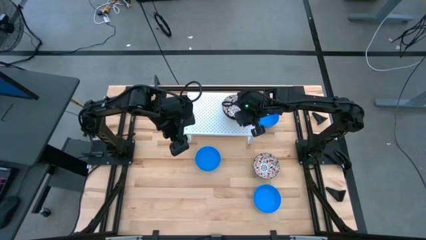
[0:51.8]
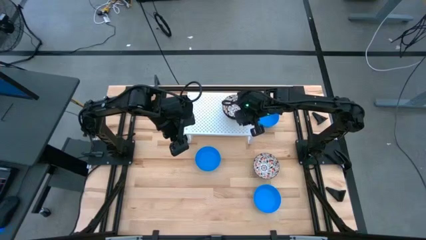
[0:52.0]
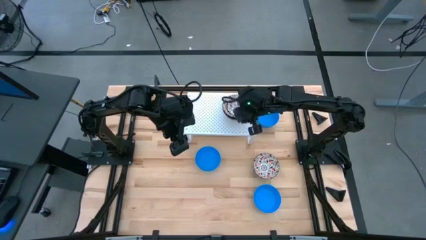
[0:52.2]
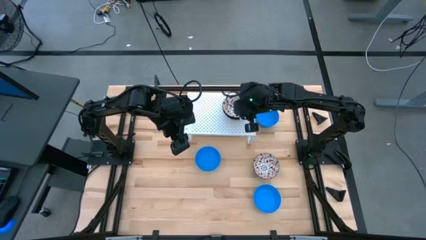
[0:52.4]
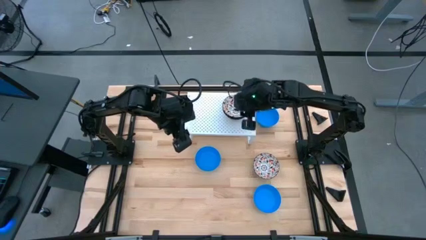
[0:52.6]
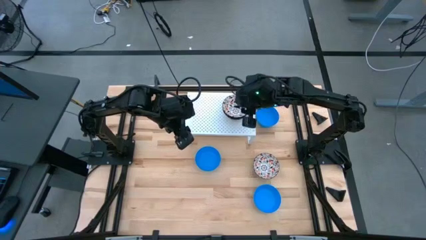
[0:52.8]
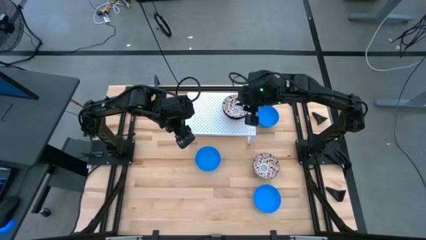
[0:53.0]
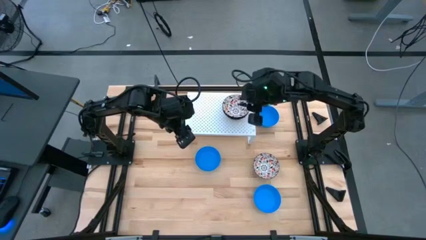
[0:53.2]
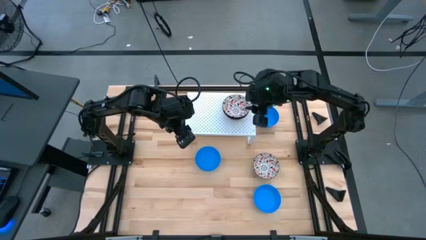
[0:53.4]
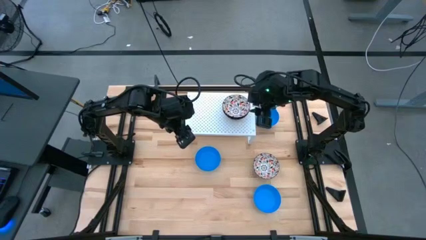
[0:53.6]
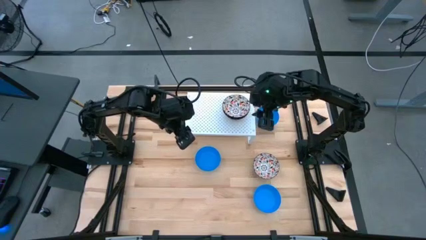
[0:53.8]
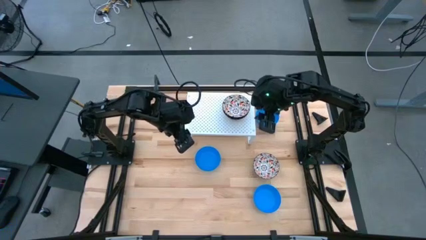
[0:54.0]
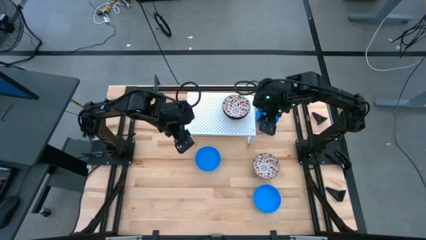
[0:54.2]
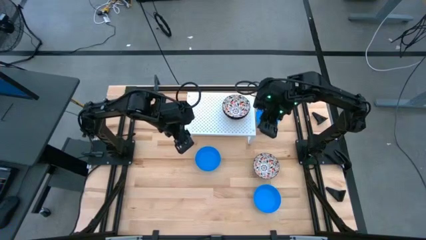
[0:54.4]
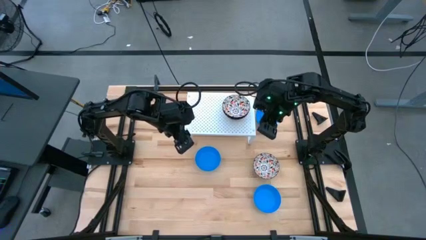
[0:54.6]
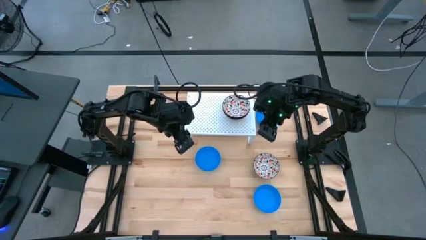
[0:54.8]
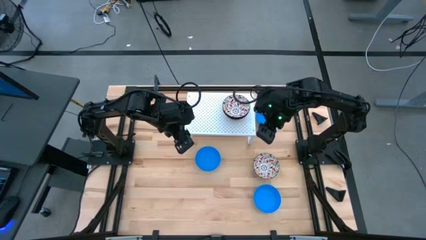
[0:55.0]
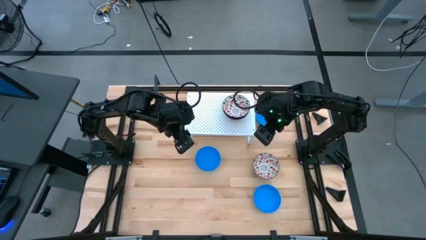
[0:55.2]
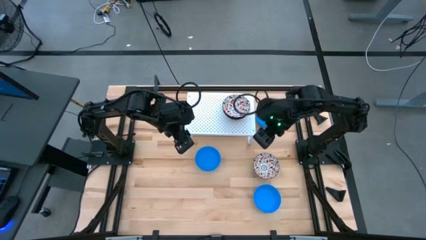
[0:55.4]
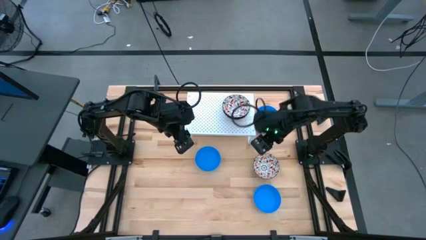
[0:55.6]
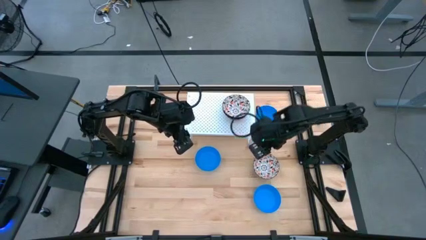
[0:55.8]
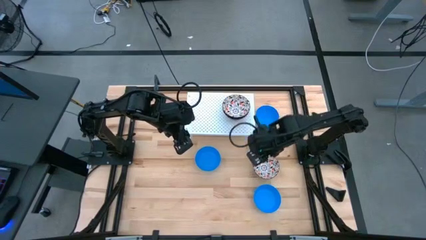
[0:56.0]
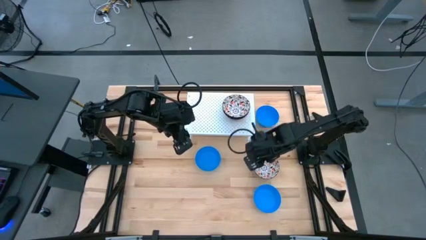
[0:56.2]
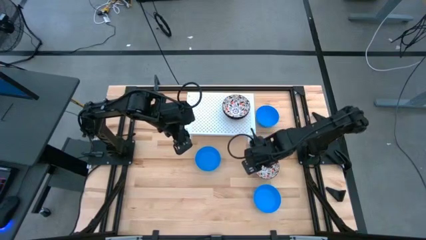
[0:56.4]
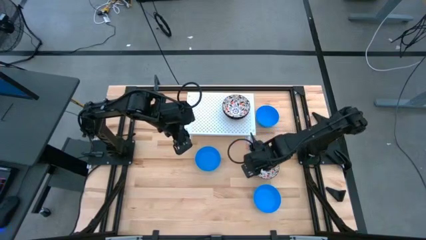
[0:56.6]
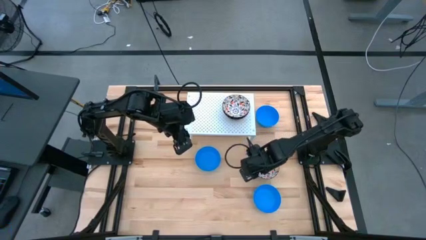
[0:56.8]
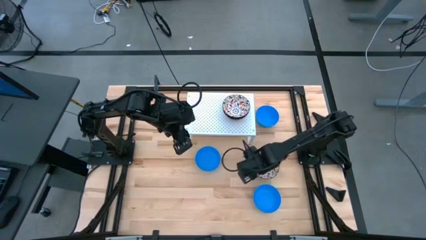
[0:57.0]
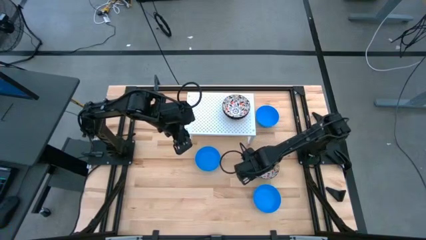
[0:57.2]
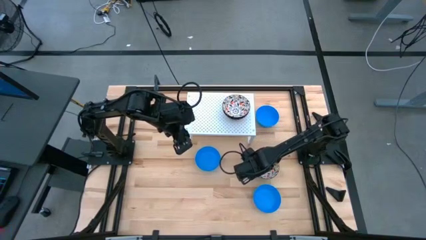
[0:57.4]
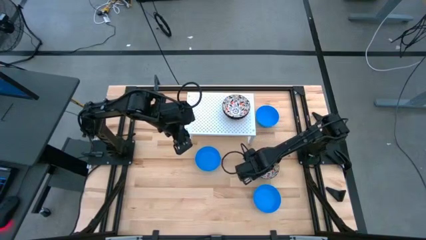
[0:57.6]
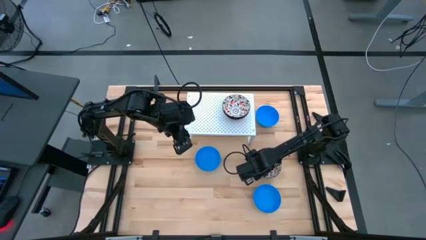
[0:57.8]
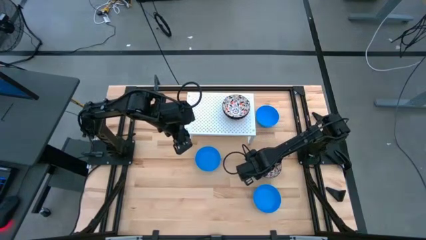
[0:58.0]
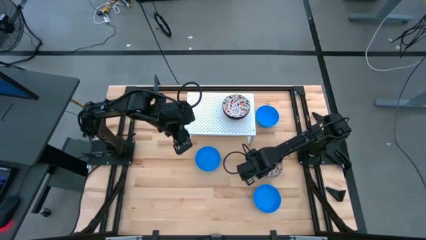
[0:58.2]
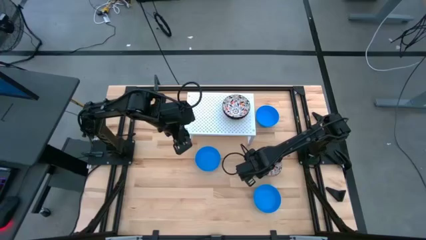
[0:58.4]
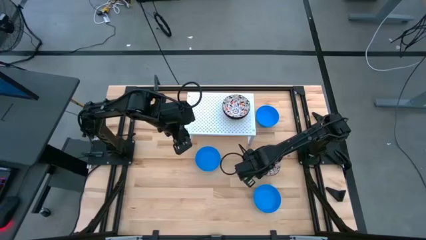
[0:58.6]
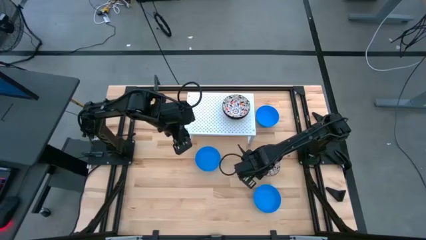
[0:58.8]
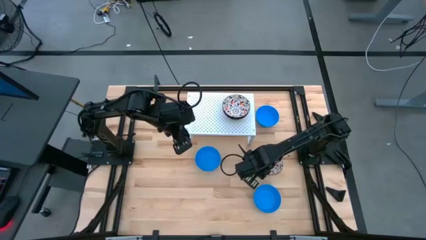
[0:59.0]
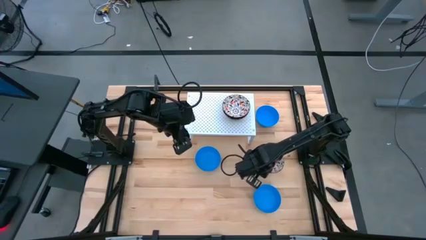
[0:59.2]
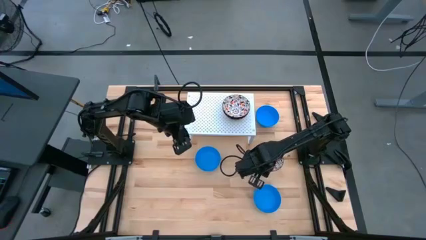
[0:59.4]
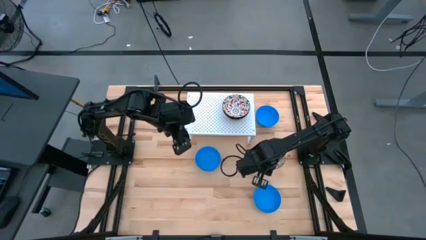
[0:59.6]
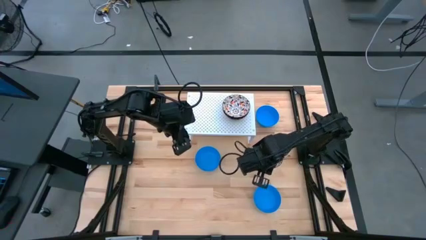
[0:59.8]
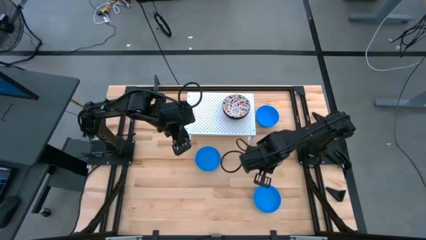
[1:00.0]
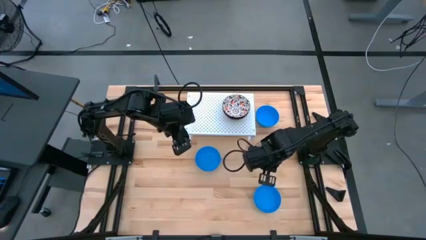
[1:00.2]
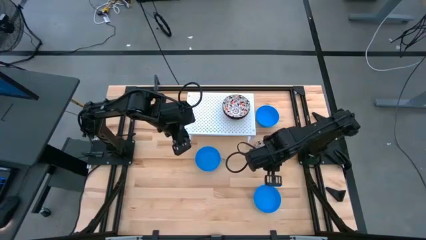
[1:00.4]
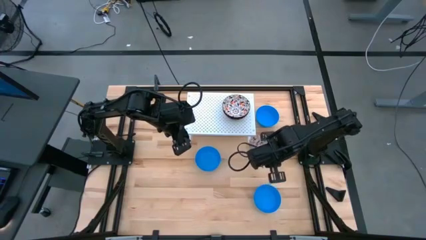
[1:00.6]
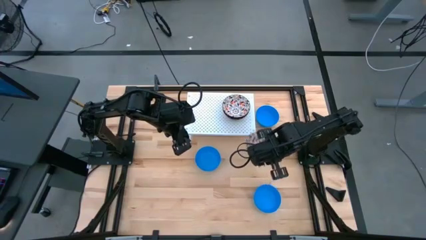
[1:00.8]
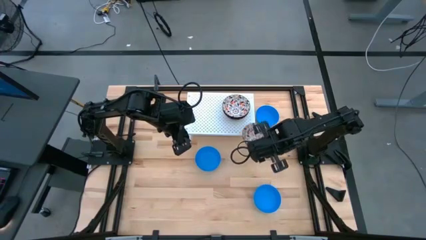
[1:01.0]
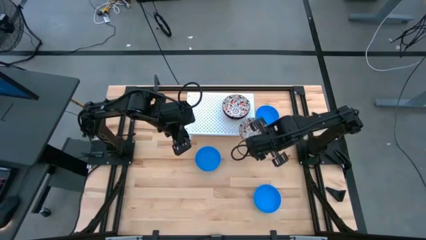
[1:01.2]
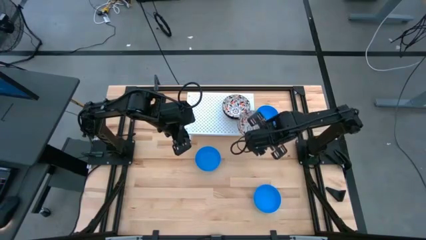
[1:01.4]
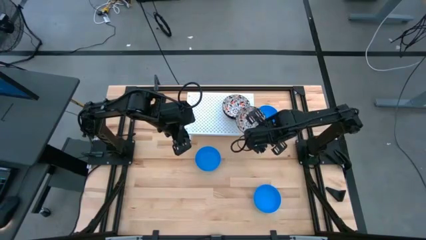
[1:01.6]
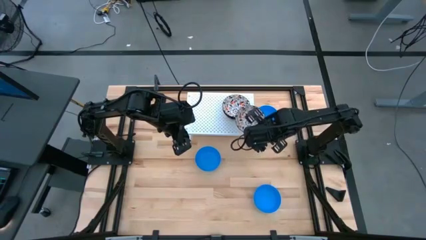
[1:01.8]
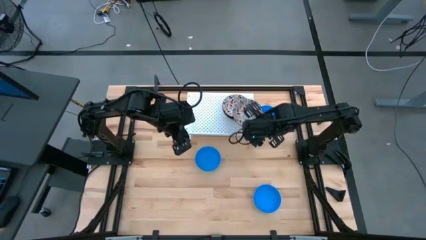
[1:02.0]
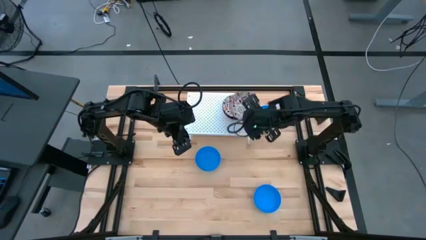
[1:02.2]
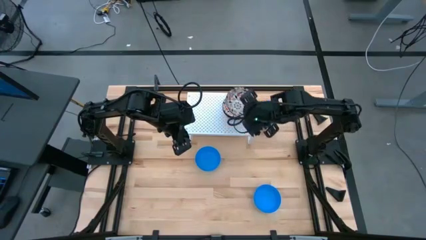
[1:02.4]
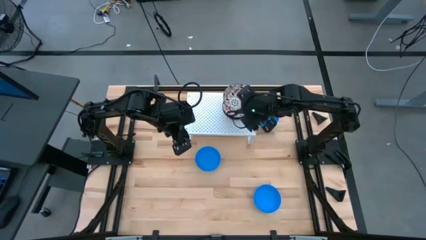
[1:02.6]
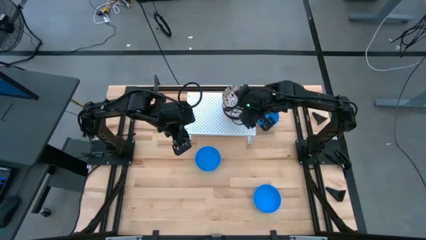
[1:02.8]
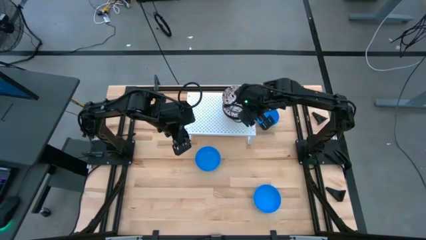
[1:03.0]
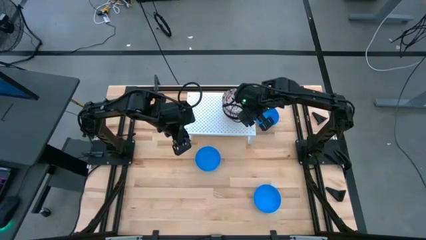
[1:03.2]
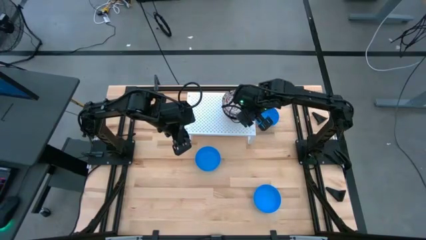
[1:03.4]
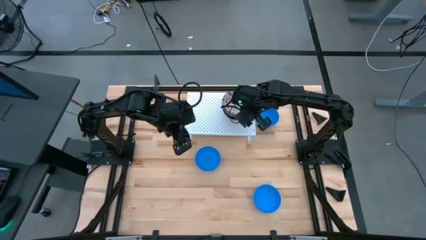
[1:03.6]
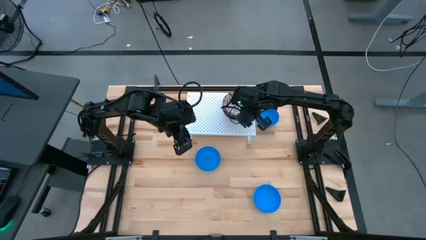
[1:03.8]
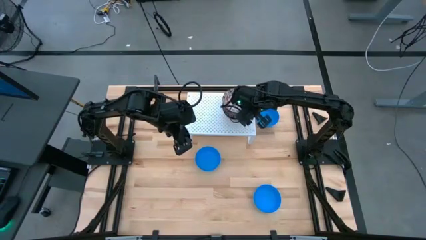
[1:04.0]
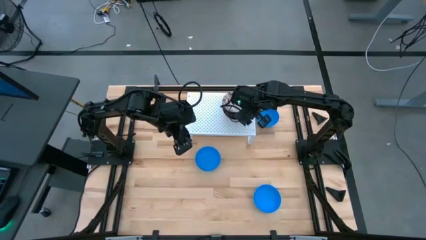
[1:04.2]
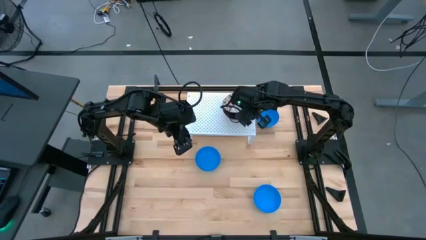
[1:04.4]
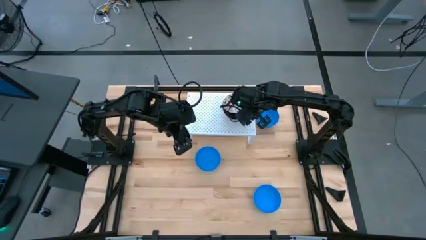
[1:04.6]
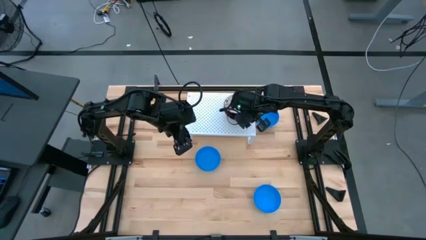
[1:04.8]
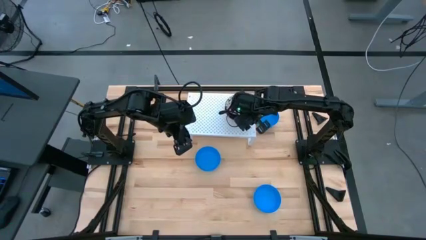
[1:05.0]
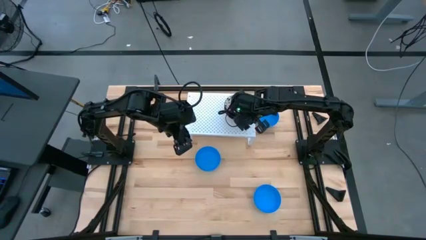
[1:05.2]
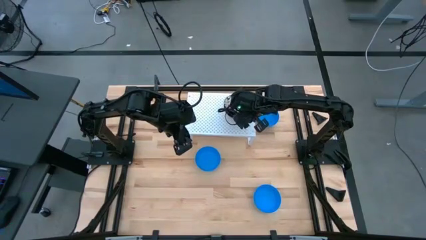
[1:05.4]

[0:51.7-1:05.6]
Task: Pick & Place Mini bowls
Stack the white patterned bowl on top of the other white patterned bowls on the shelf

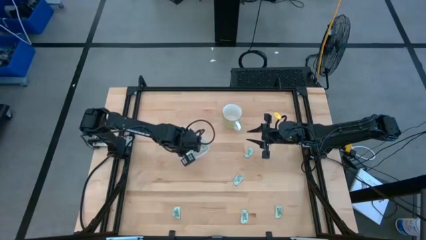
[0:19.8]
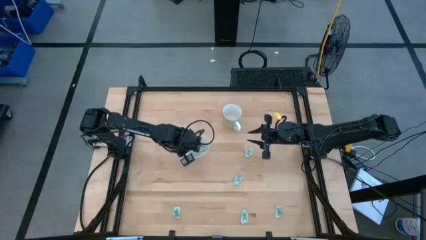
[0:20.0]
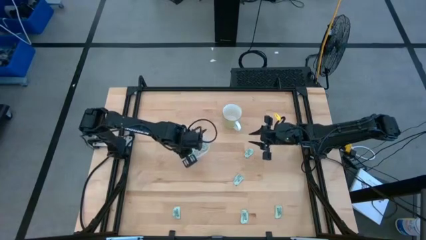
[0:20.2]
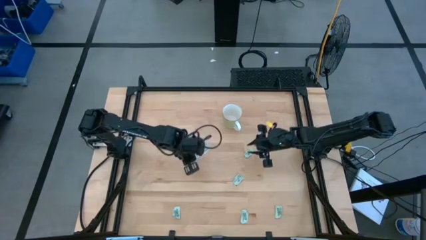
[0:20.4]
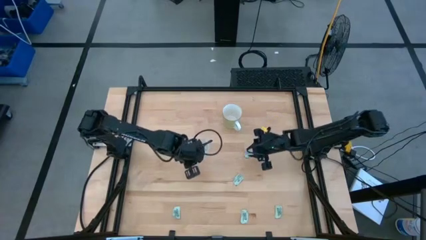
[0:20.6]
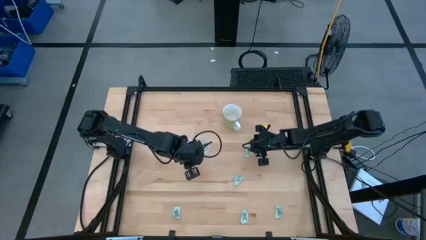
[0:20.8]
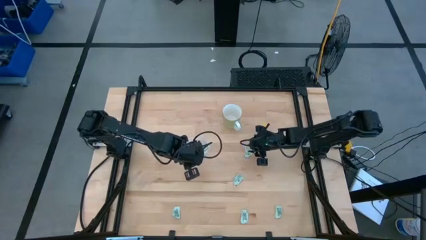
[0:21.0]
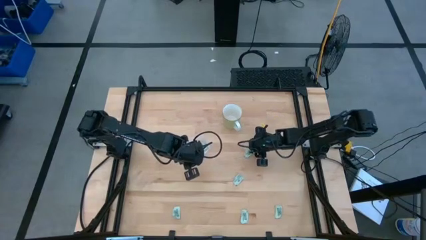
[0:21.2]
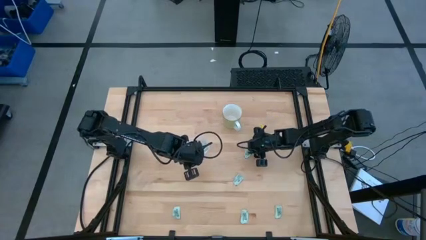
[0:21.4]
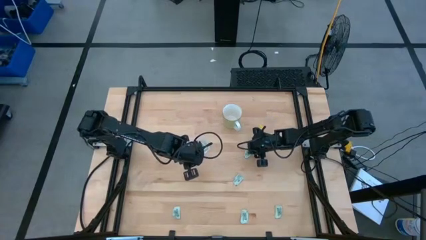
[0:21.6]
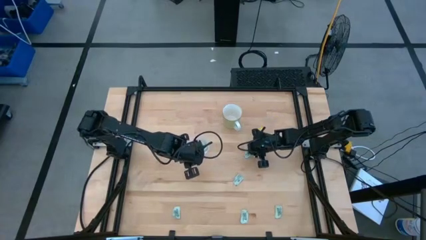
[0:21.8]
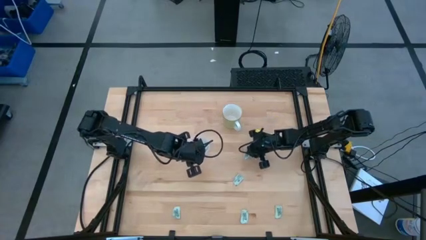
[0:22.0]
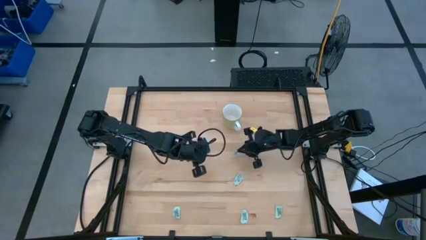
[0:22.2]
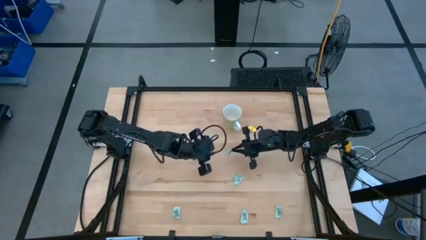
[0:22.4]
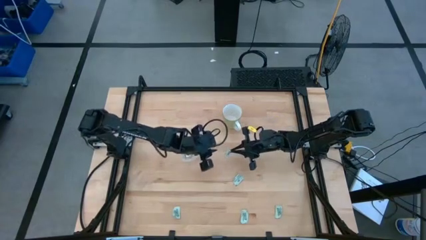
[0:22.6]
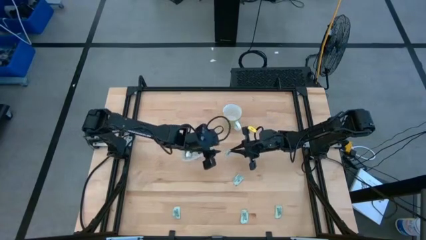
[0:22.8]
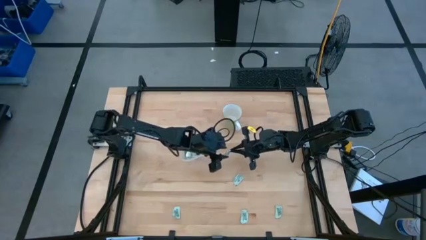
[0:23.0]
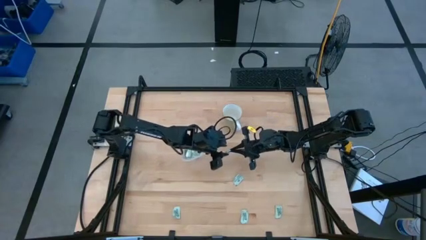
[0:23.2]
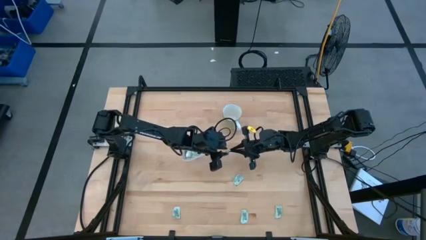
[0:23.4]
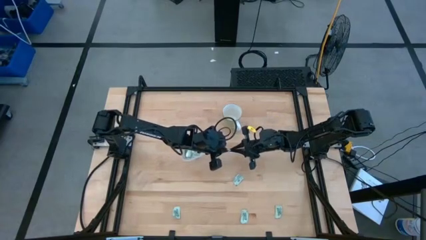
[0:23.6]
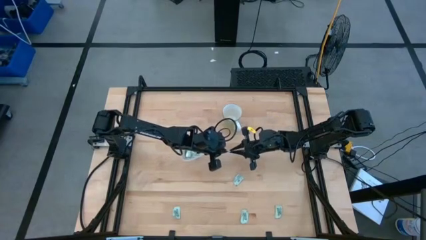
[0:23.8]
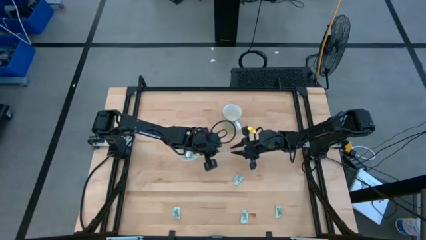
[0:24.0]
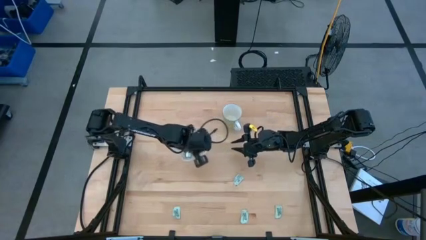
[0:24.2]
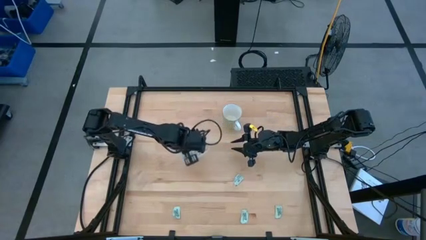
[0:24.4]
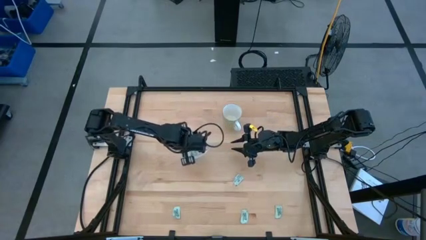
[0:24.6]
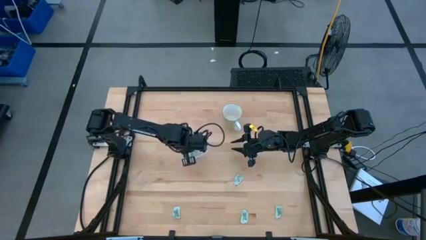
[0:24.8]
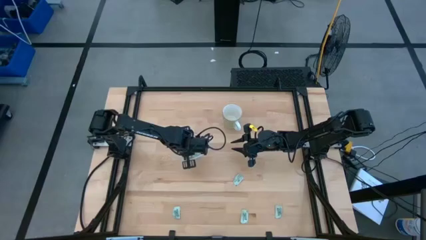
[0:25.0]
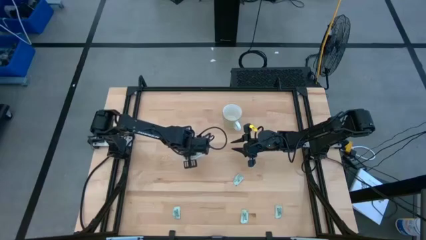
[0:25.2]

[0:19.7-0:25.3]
Task: Pick and place Stevia / Truvia into bins
Put the white stevia packet into the bin
